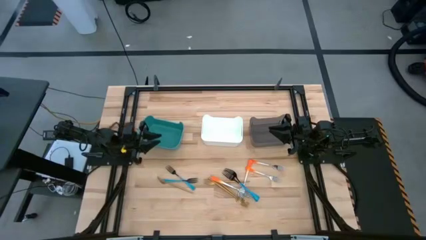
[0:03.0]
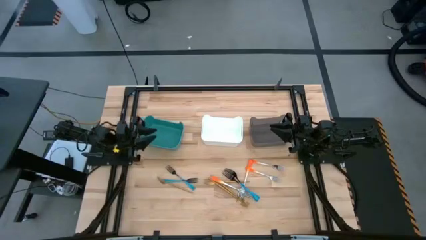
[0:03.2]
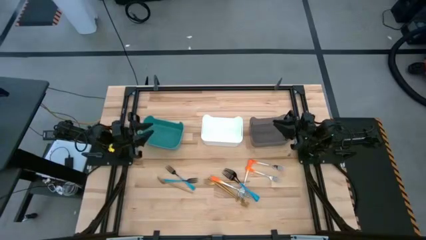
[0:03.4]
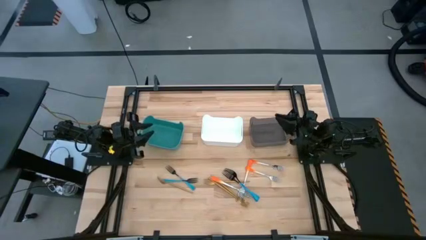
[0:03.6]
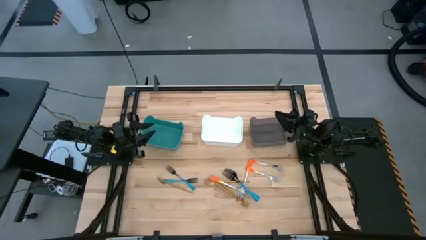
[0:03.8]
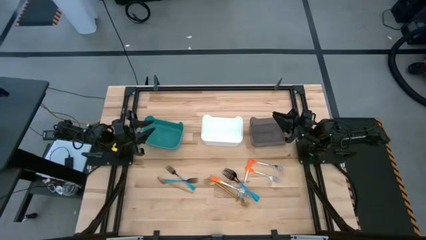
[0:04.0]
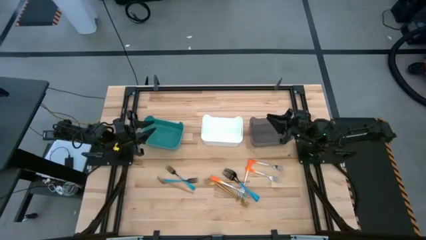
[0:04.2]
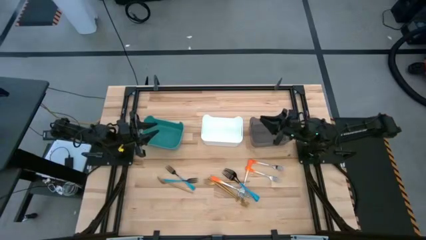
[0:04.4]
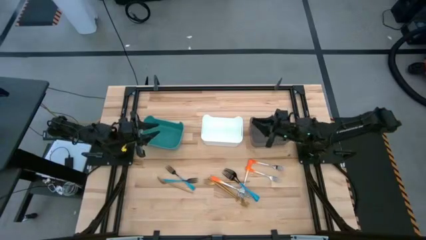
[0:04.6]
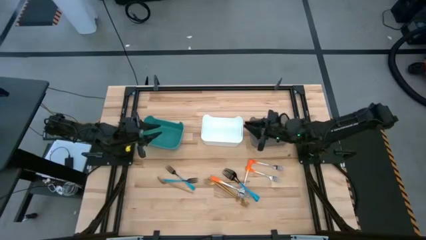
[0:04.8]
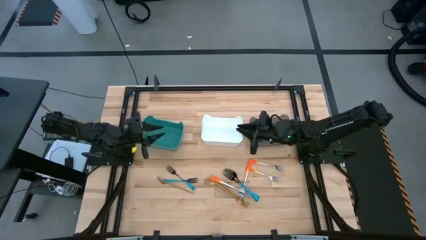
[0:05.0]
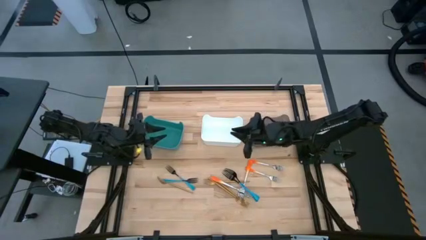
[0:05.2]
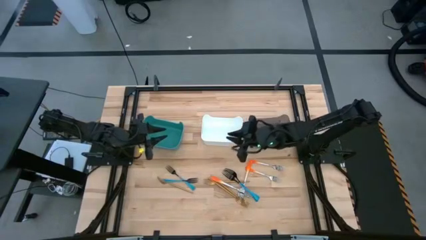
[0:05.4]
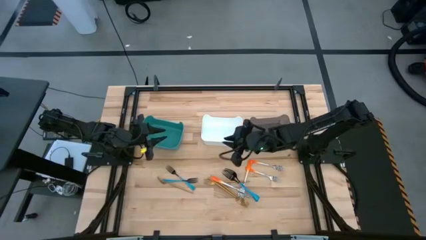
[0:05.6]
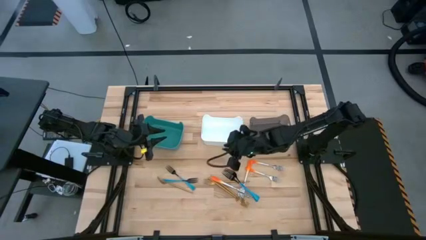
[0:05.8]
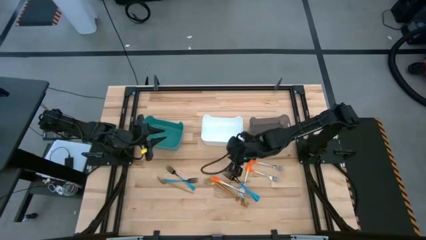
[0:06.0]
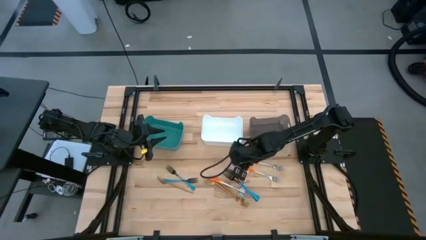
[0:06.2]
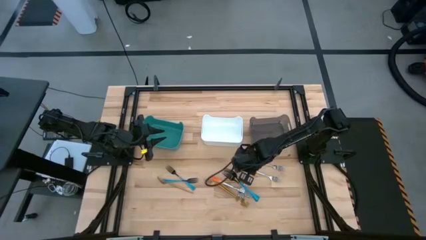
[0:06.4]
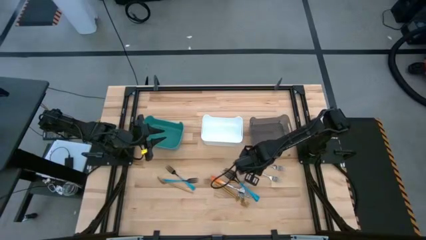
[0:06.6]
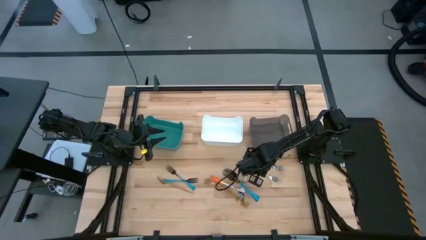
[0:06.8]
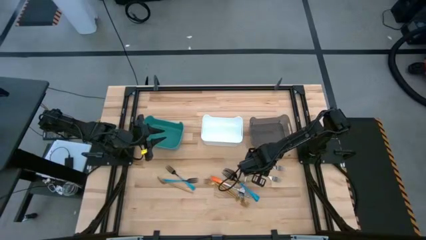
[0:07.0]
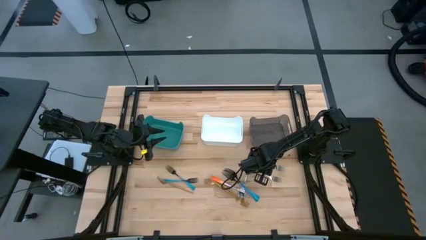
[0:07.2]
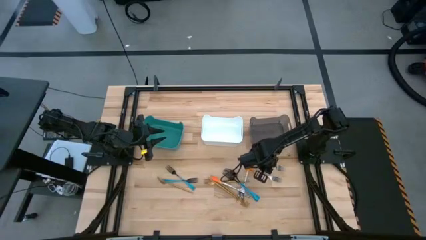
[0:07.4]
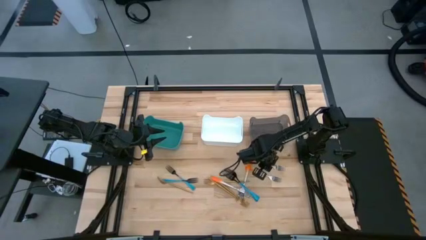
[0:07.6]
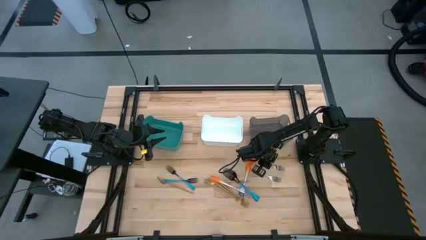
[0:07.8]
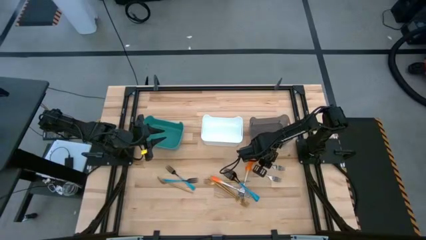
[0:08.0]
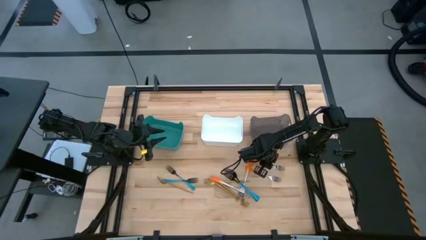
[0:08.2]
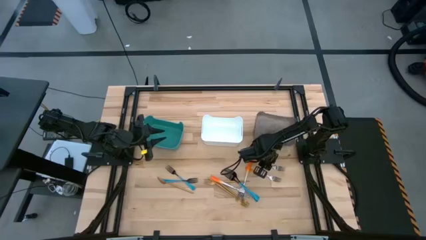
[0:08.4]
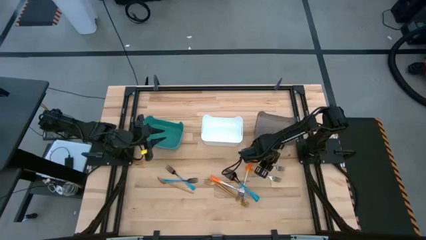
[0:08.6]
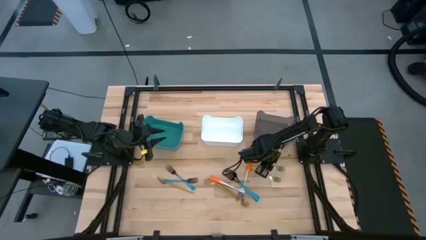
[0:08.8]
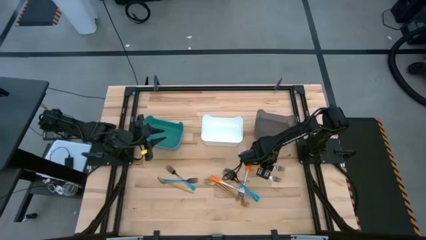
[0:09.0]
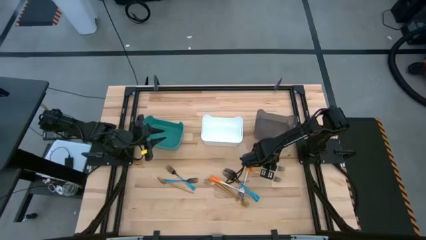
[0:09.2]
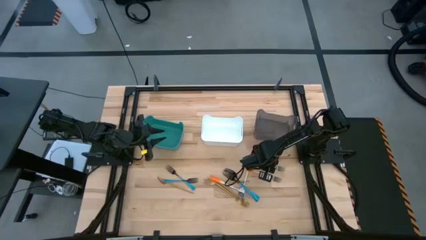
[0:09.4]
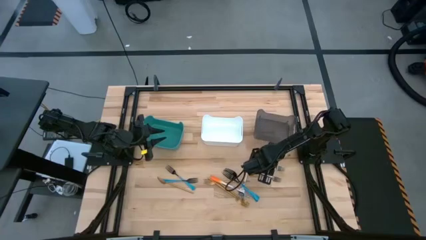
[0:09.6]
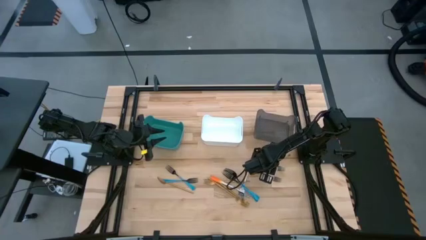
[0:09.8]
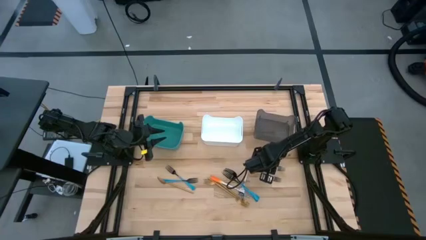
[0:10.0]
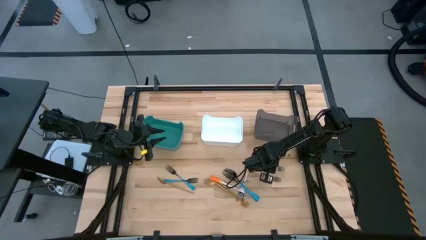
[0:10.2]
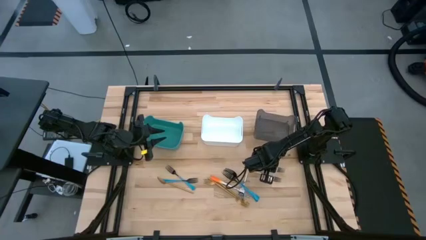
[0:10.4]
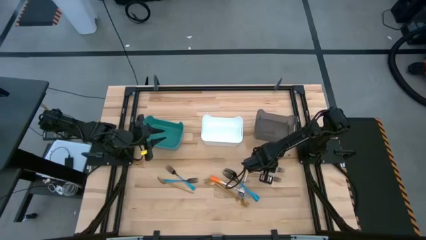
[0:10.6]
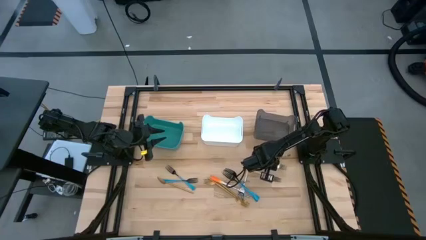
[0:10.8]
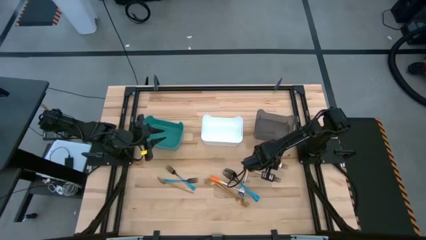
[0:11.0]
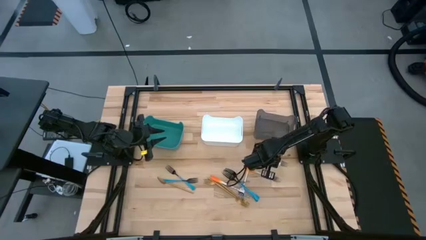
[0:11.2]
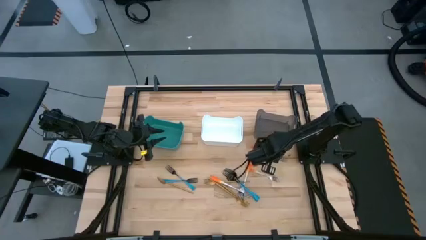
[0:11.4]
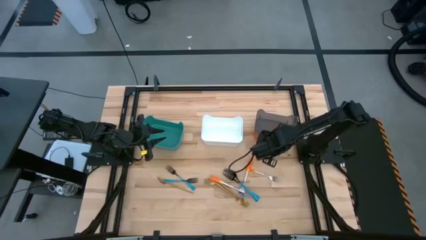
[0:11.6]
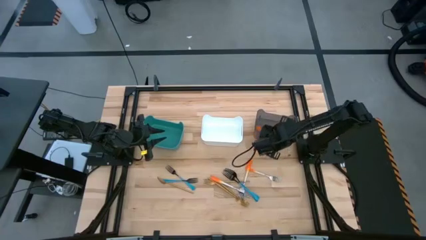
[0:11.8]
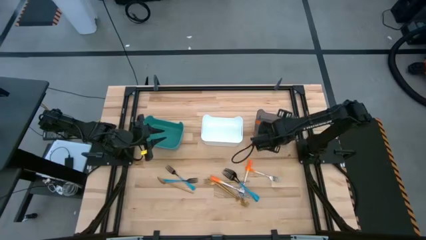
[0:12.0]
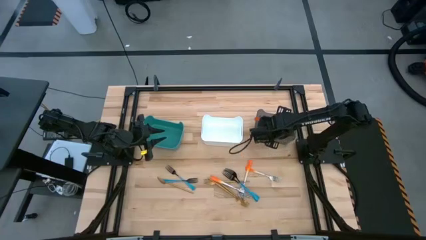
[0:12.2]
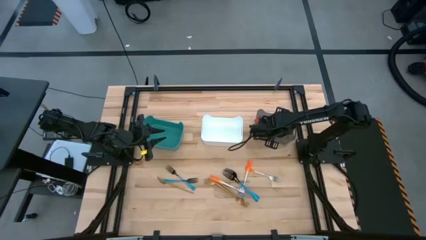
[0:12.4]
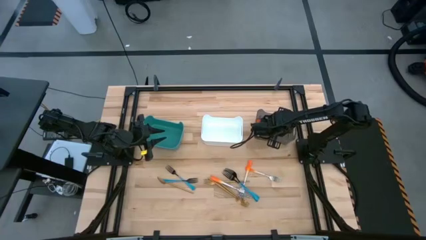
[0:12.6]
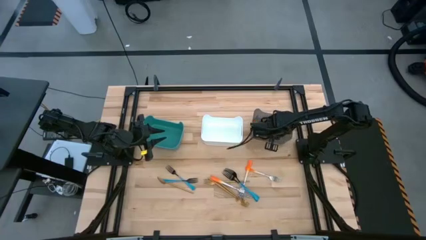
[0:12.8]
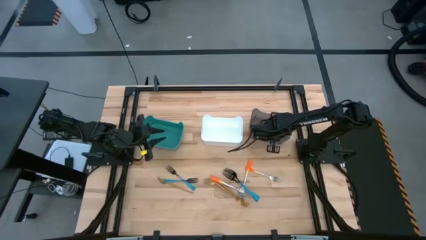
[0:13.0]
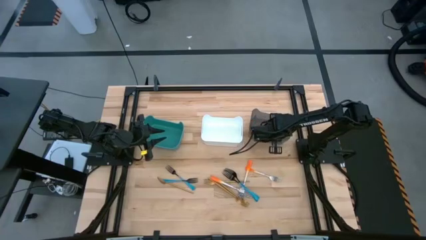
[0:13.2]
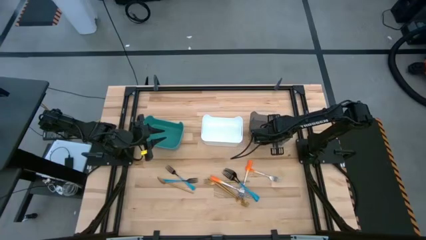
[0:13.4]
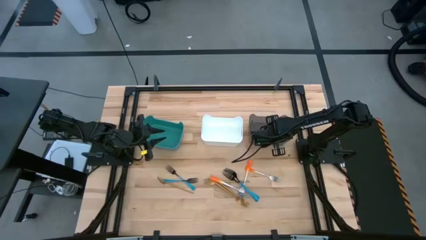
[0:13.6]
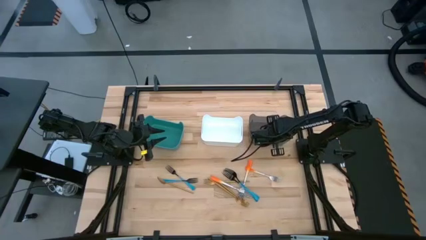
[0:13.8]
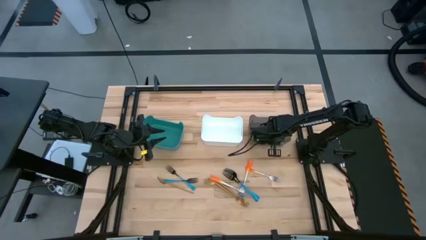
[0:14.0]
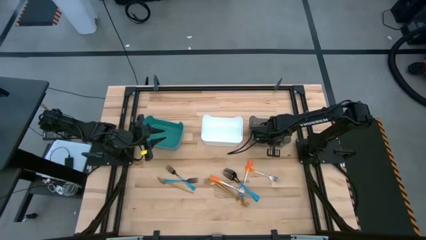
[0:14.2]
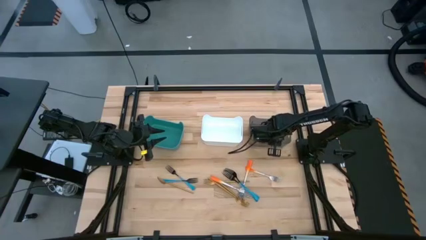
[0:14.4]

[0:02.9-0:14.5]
Task: Sort silverware by color (type)
Put the top right orange fork into the transparent black bin

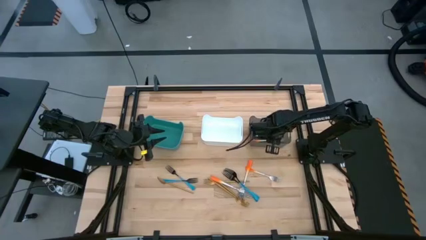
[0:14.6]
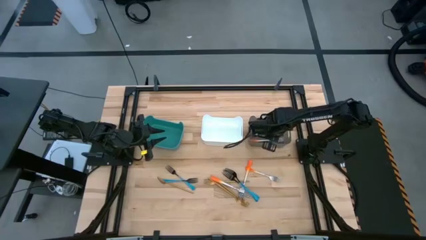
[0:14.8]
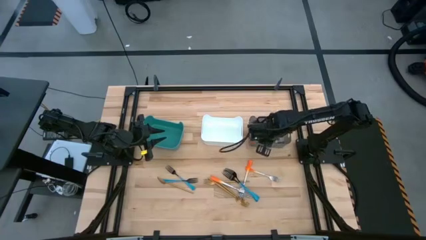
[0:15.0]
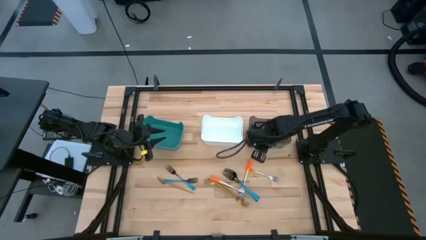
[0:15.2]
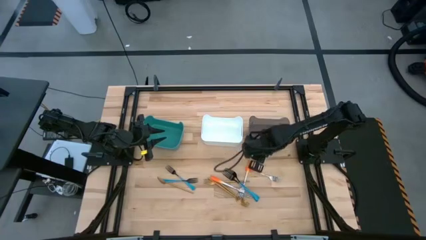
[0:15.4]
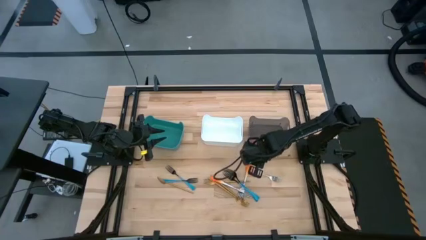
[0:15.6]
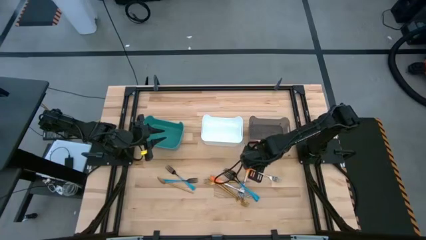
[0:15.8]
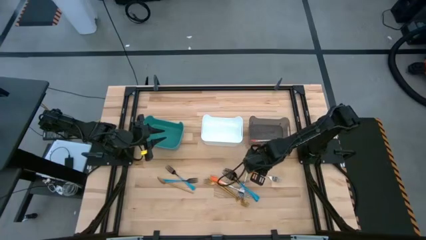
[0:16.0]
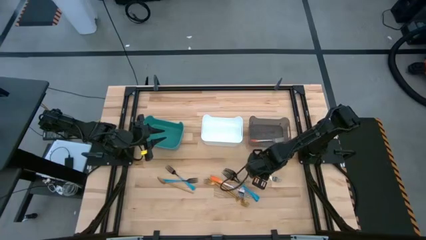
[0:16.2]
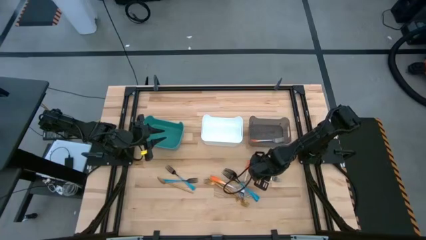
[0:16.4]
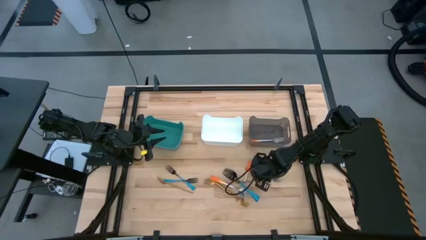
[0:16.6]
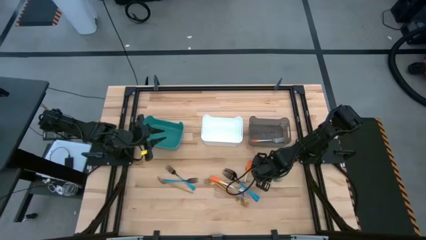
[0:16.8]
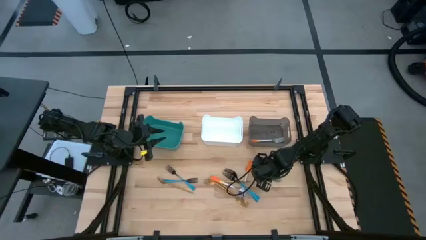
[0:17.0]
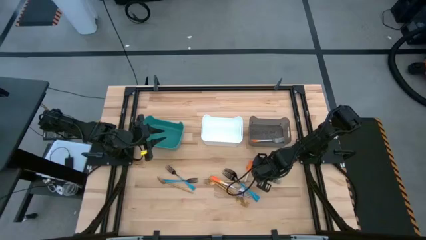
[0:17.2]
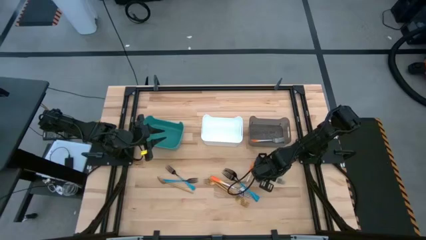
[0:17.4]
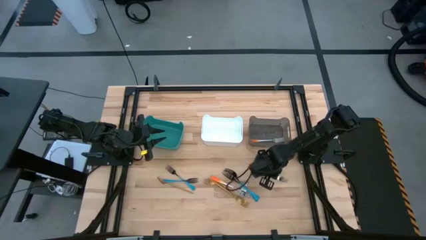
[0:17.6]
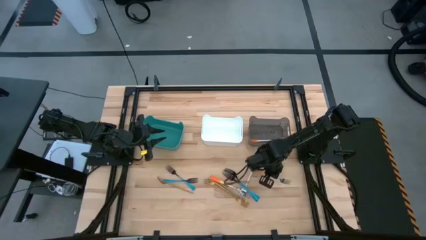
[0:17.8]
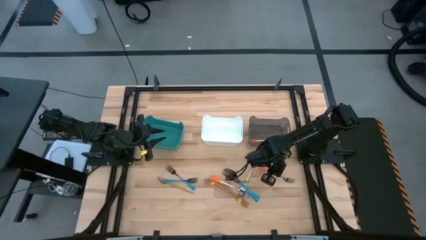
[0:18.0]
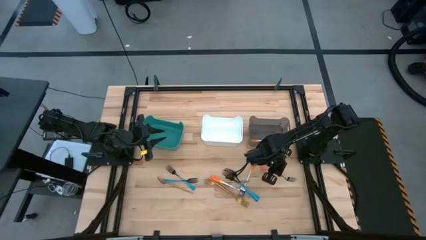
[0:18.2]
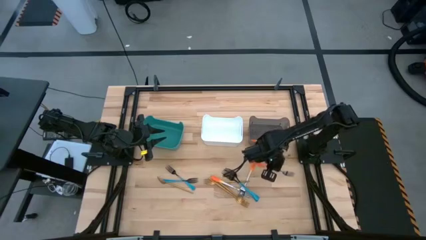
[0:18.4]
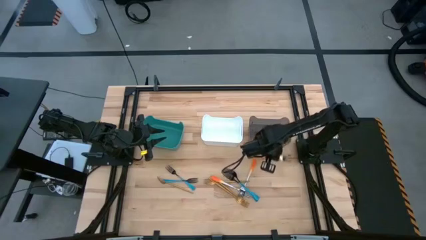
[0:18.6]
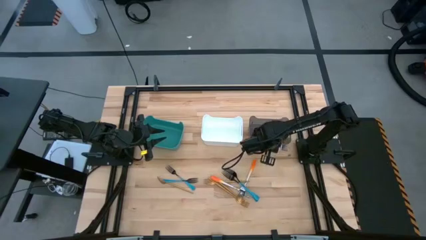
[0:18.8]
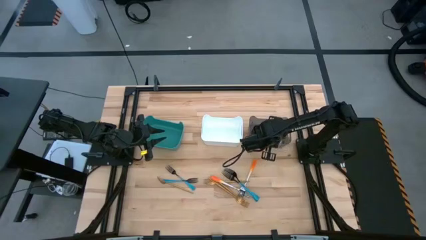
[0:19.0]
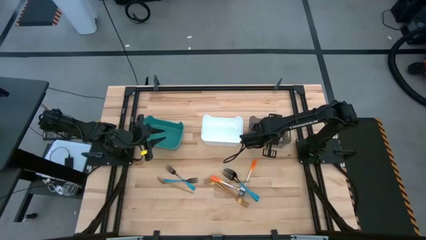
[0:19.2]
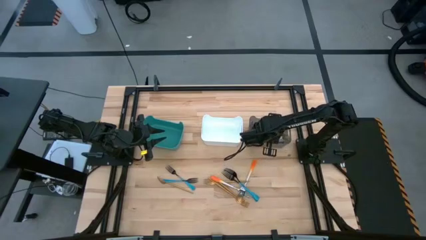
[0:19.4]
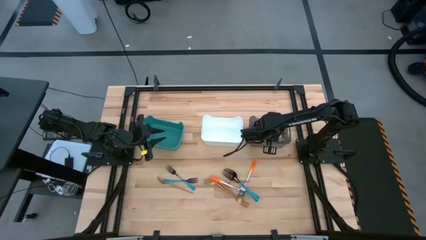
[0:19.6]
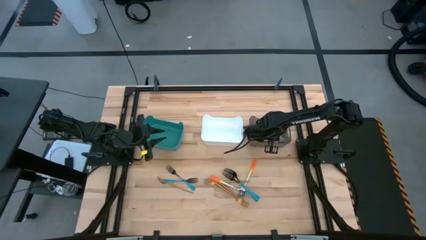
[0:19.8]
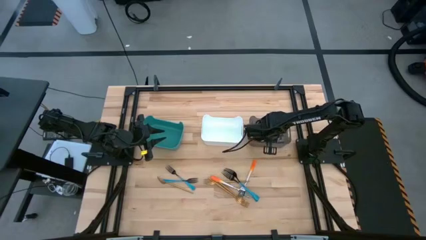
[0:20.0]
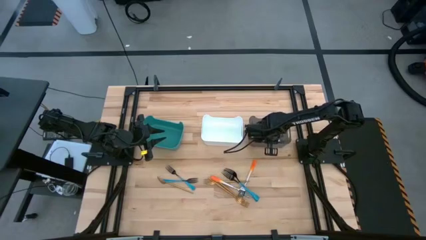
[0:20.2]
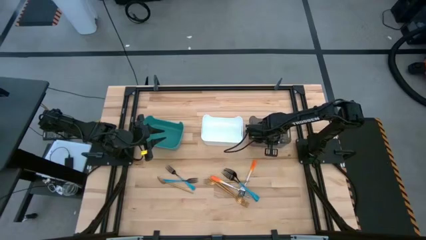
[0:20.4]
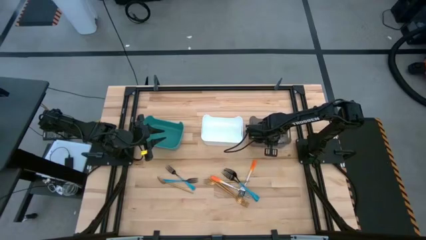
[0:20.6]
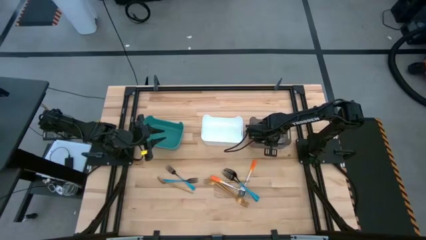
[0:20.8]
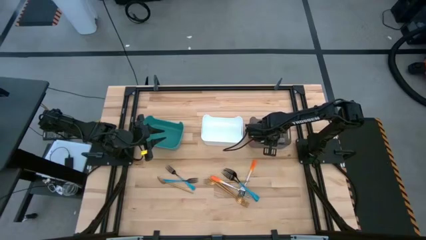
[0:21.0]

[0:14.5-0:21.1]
Put the top right orange fork into the transparent black bin
